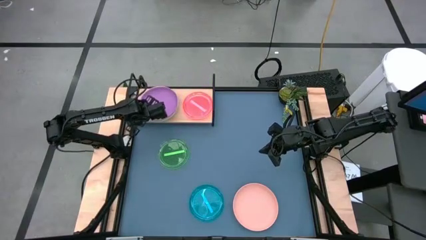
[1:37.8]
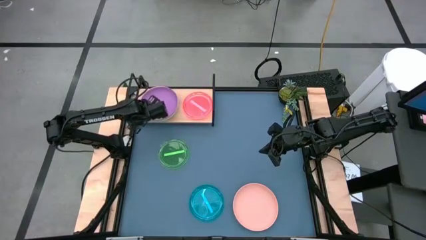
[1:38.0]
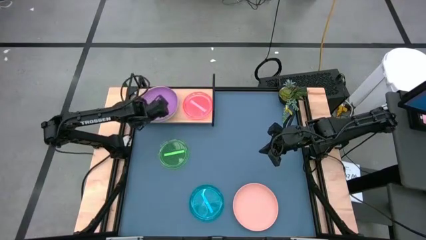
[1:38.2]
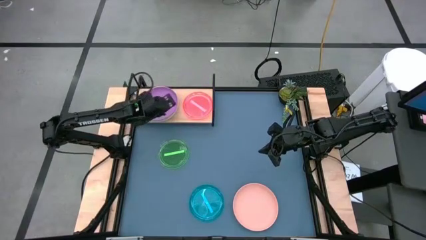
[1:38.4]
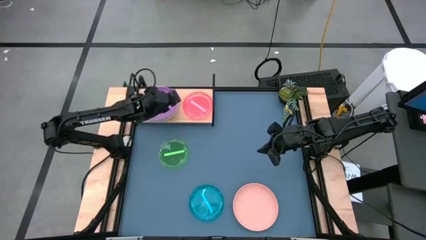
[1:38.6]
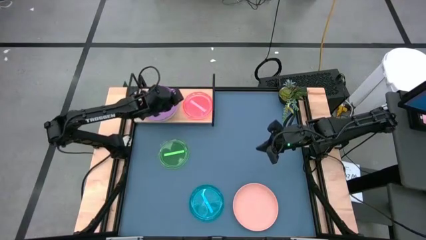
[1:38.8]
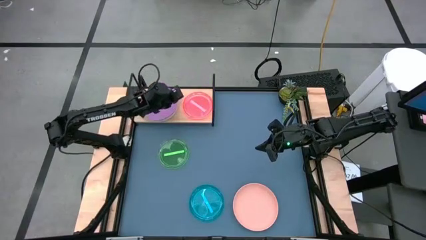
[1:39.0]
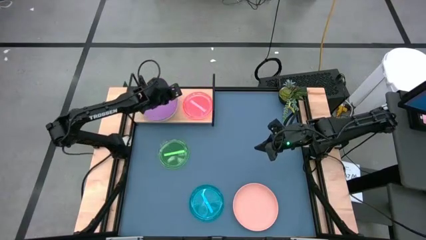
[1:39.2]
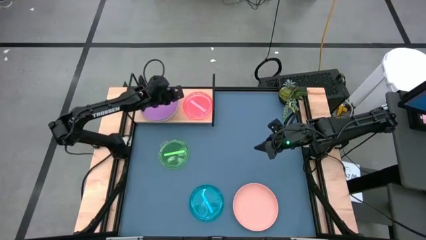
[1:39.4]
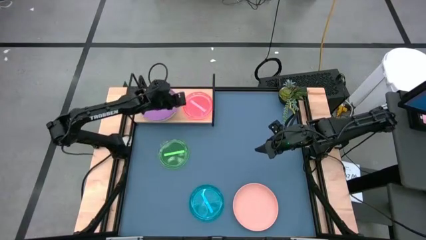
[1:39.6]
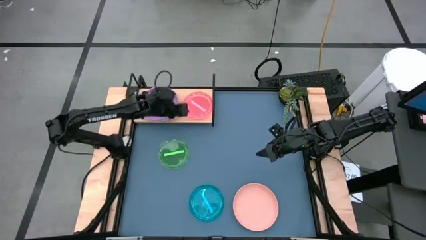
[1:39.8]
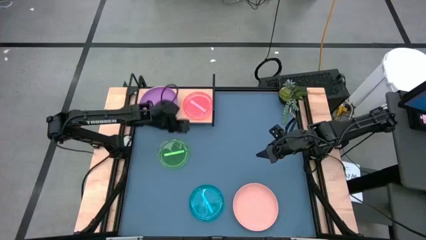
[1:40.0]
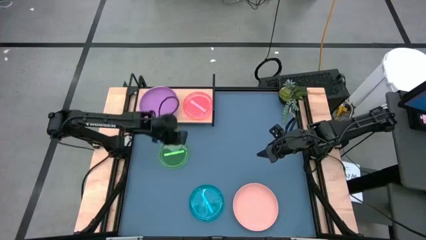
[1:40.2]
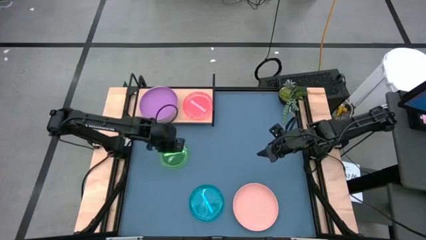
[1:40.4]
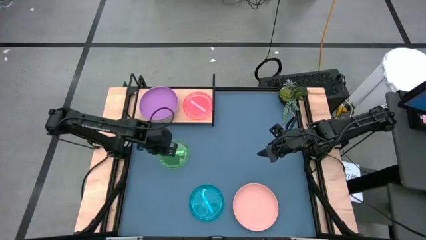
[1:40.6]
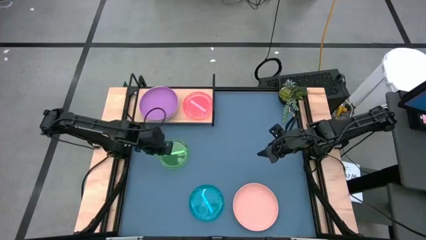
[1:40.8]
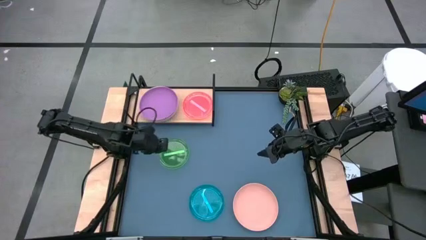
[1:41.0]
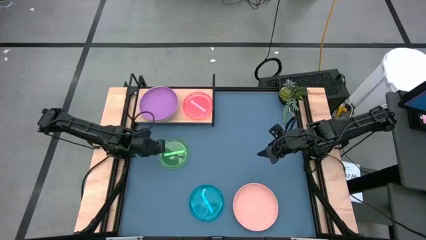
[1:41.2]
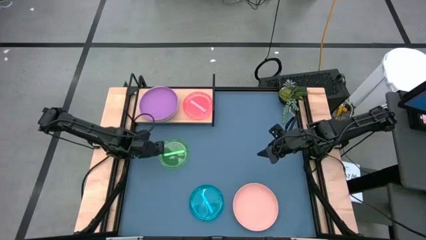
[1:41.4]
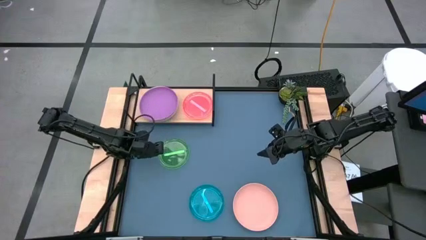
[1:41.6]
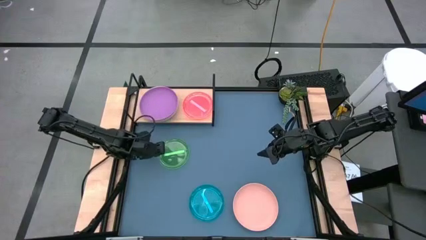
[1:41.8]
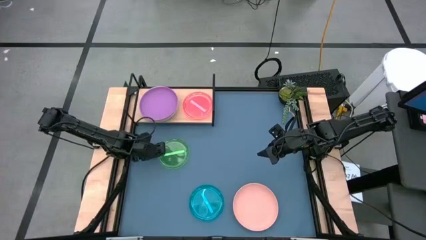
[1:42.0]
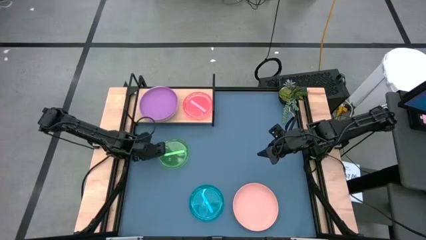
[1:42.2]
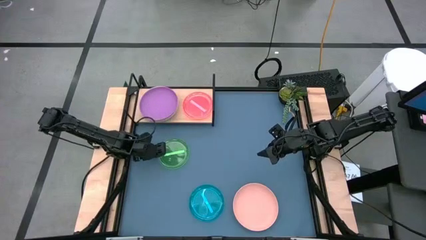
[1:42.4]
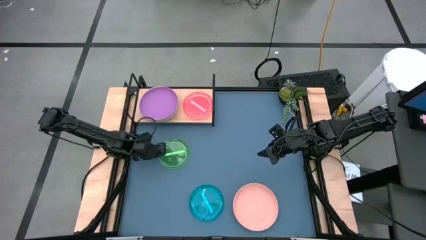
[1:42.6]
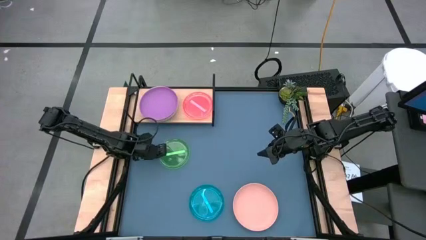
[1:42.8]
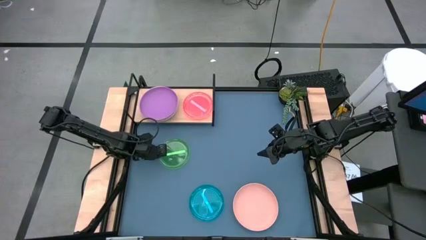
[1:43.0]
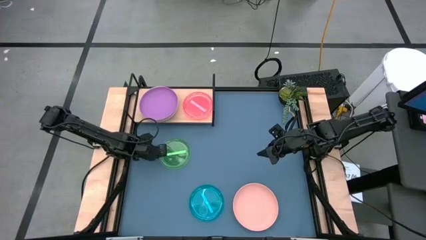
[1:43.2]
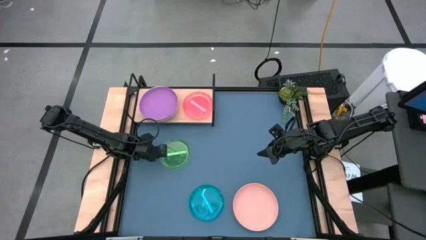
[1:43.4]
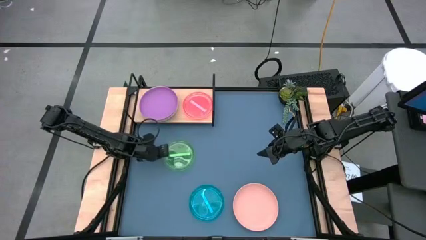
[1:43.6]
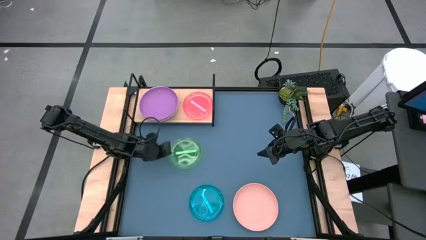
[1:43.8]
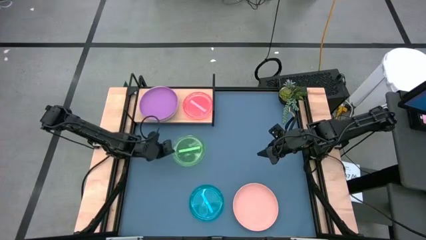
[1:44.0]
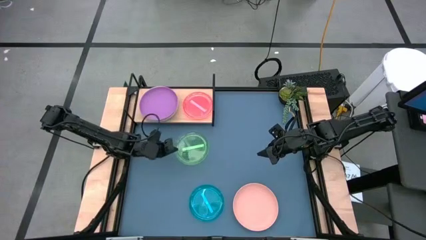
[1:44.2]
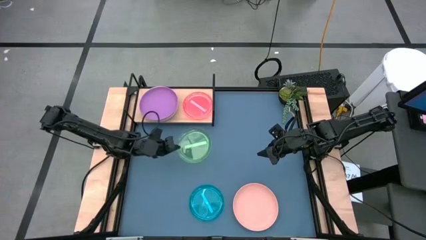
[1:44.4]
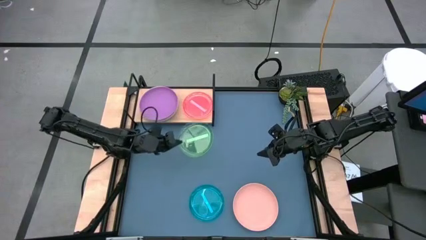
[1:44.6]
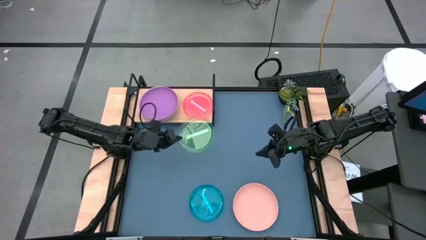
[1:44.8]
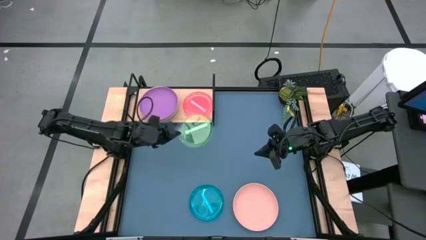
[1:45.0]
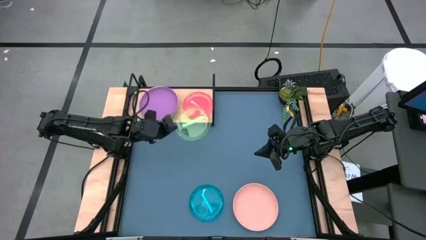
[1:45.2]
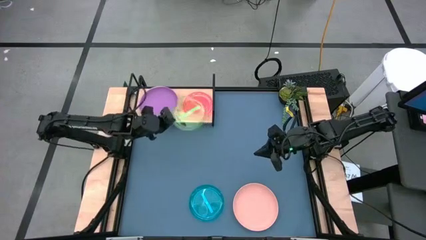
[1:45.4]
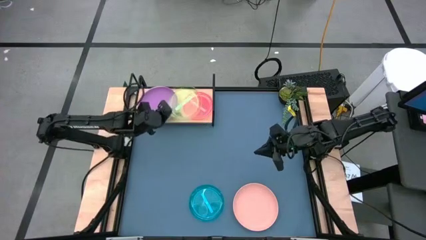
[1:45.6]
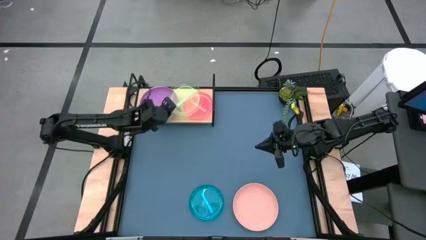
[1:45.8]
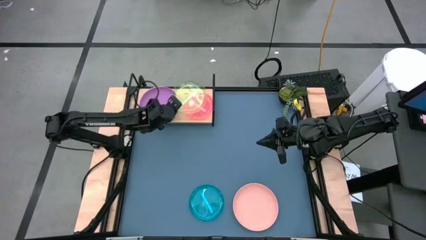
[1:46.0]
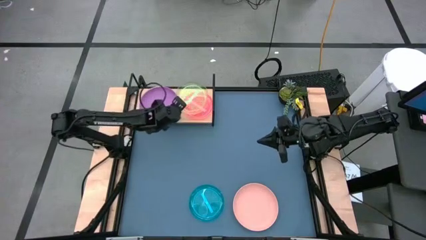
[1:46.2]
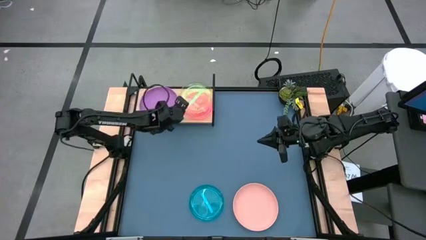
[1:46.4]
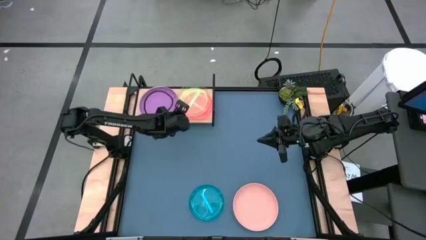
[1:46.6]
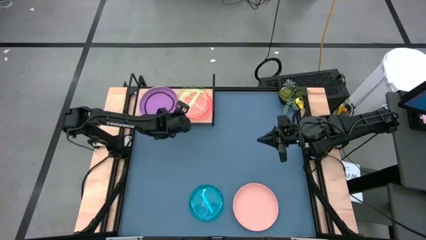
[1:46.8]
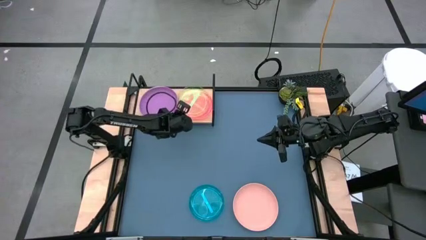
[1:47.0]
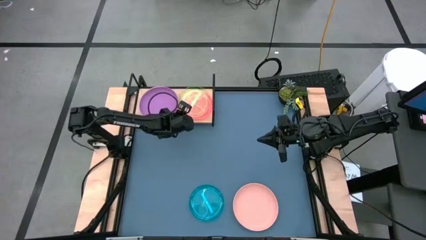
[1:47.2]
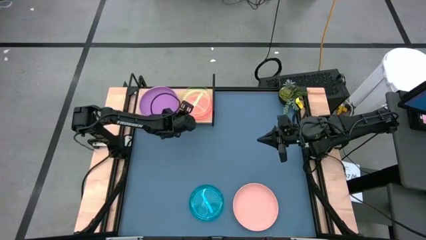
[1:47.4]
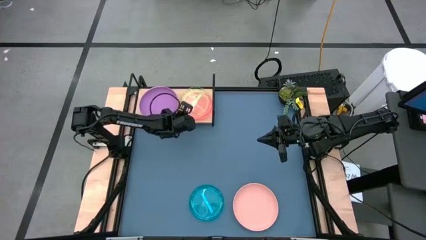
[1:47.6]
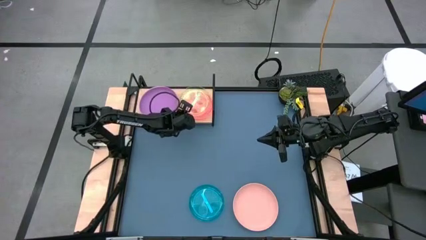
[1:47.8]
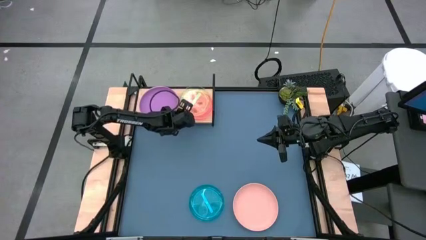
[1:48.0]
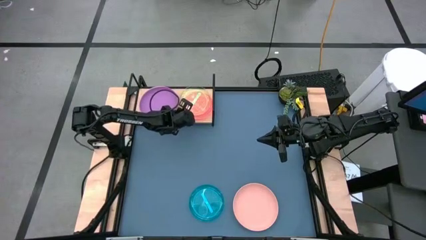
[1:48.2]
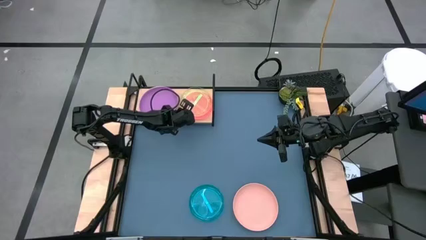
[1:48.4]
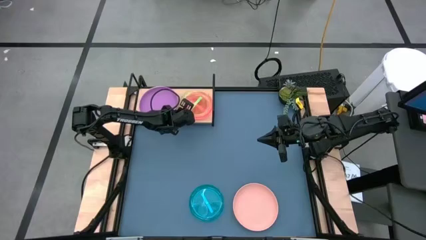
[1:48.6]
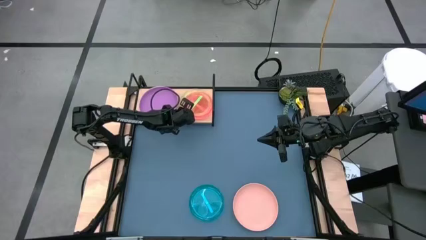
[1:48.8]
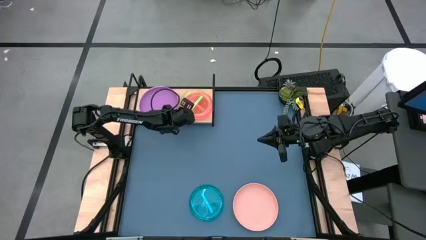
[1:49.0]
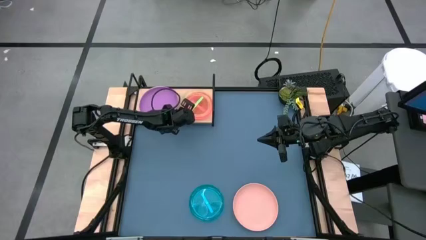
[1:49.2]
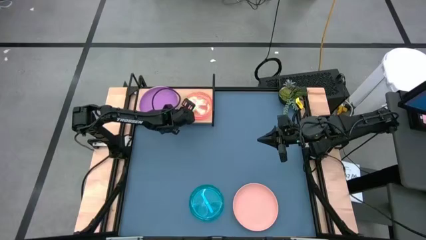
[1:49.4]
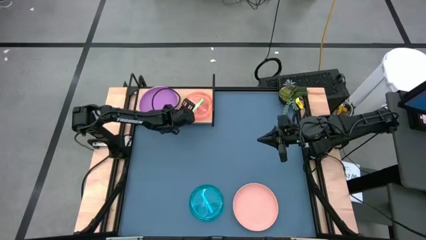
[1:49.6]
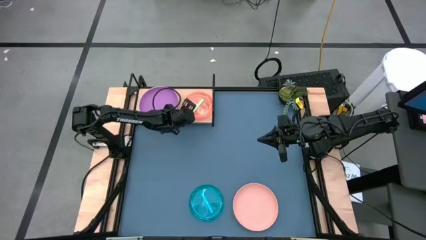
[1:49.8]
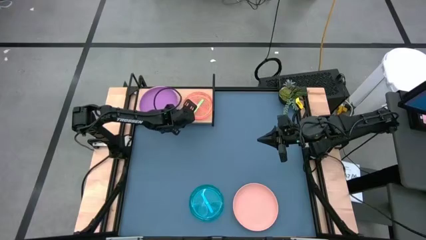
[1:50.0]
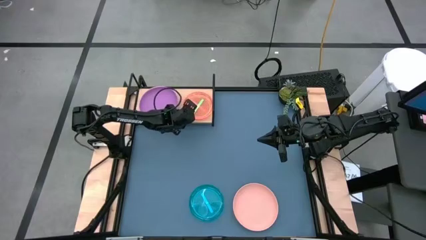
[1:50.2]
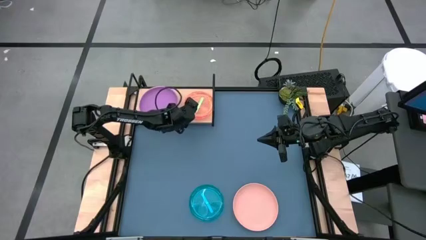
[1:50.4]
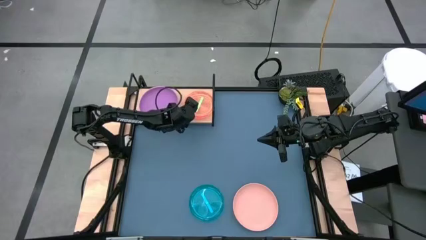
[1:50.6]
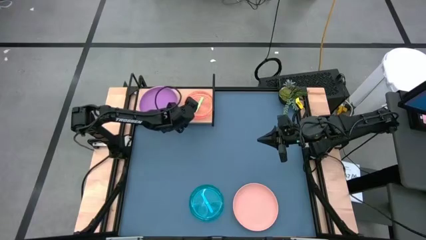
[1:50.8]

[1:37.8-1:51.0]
Task: Place and stack plates onto a shelf
Stack the green plate on top of the pink plate on the shelf

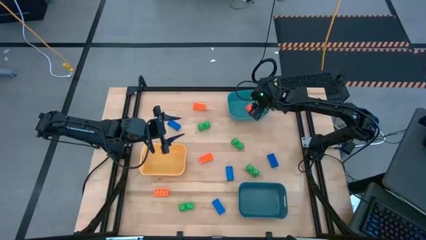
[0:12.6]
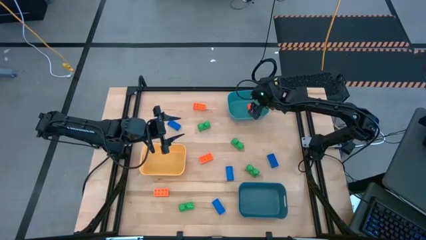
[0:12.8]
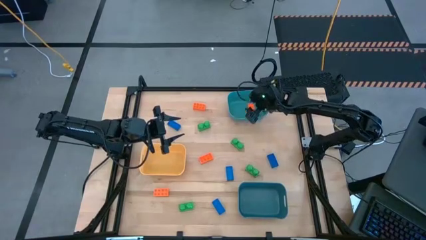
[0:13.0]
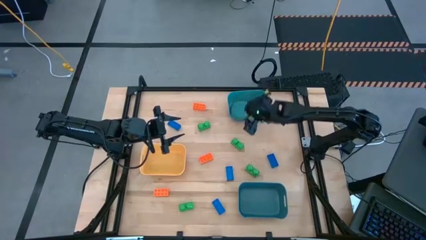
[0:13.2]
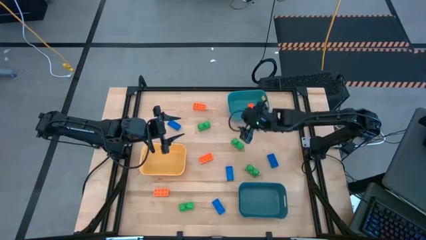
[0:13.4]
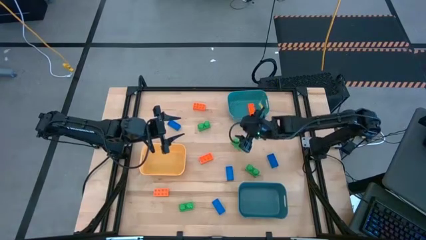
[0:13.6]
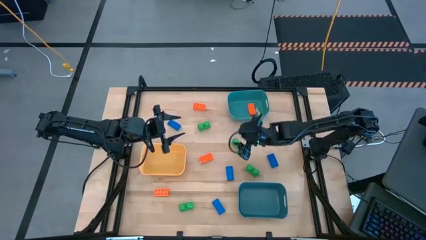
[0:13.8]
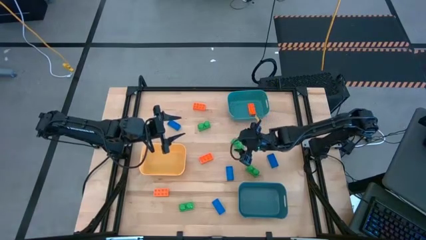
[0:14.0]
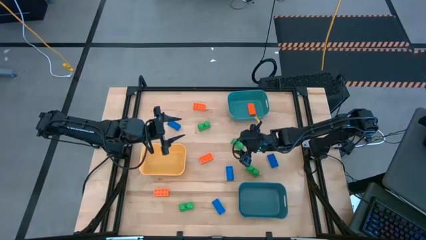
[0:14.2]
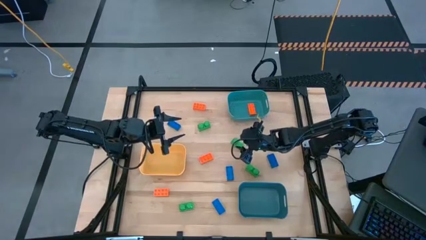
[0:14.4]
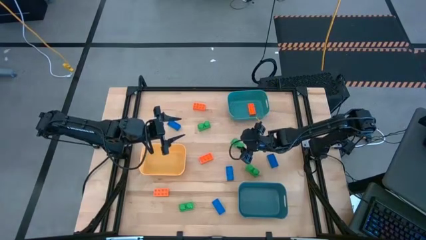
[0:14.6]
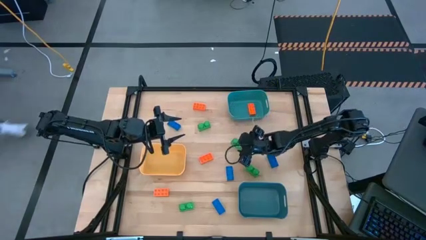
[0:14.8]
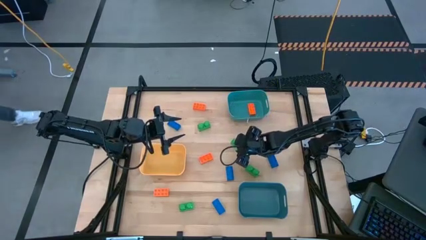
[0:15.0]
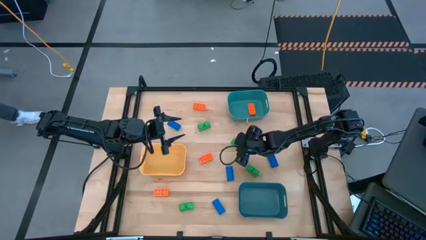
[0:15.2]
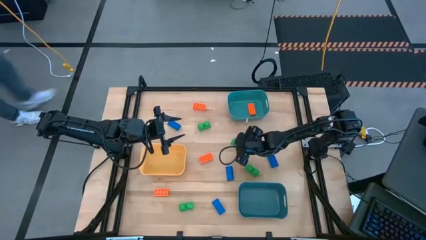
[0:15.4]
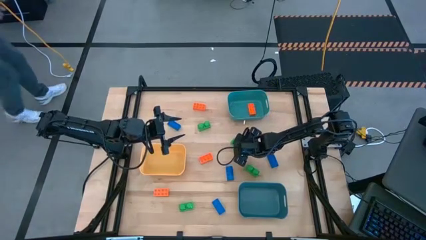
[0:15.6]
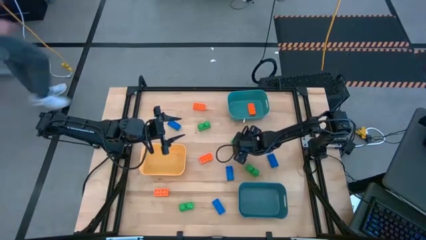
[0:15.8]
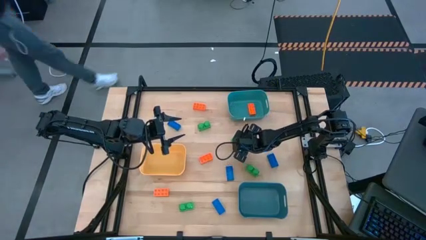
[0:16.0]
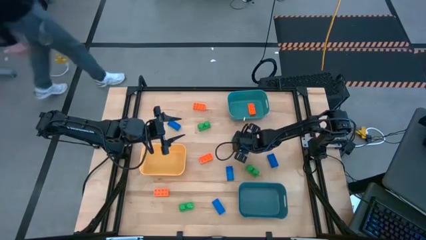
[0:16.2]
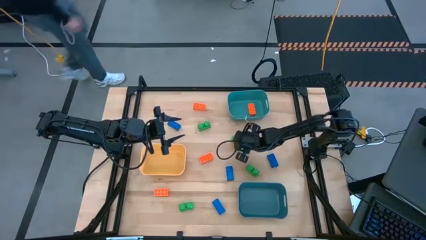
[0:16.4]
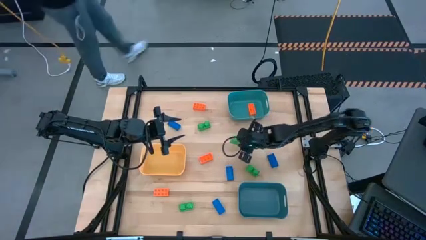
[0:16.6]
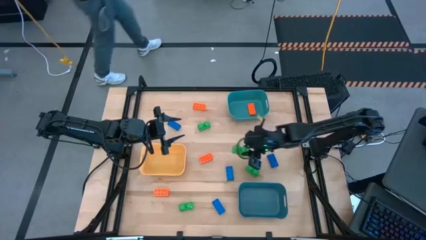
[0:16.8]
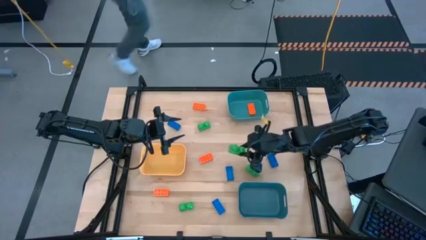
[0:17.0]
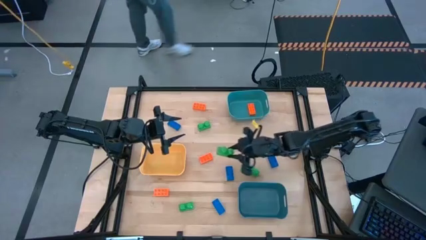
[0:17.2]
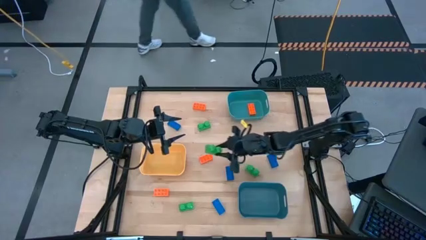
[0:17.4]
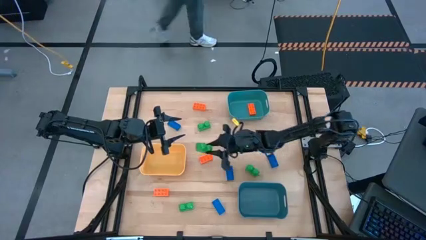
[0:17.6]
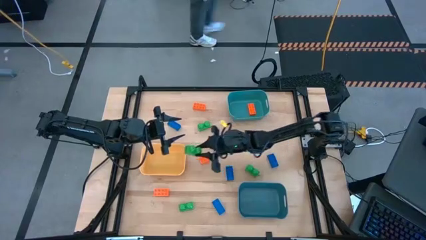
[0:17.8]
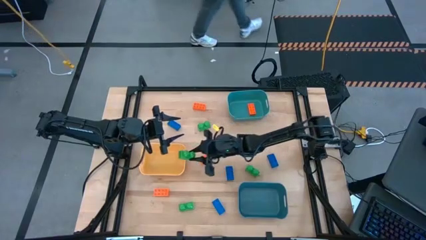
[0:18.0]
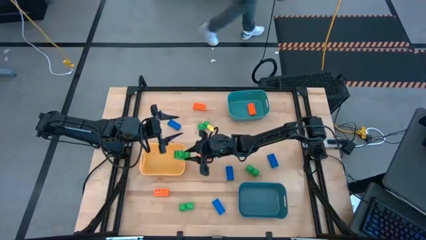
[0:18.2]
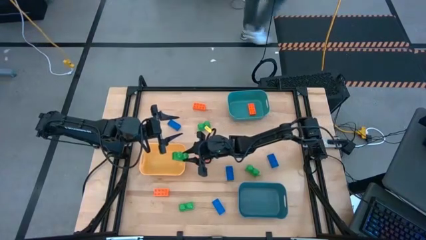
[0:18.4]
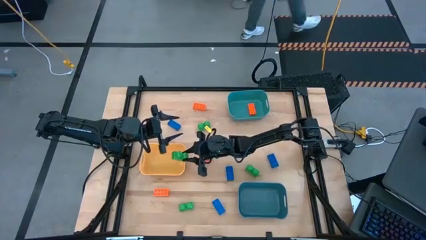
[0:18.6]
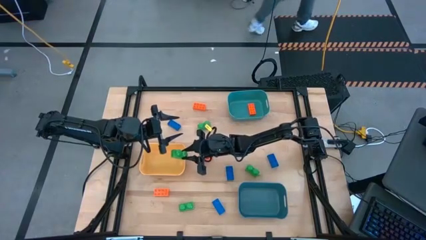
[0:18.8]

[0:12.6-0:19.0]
Task: Sort & place blocks by color
Put the green game piece into the yellow bin
